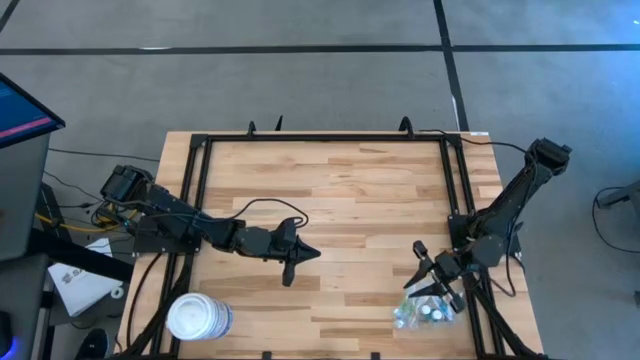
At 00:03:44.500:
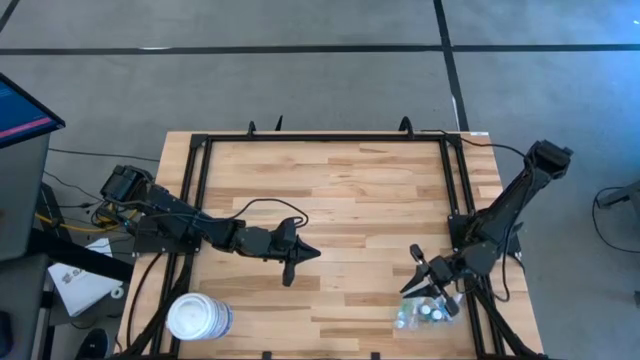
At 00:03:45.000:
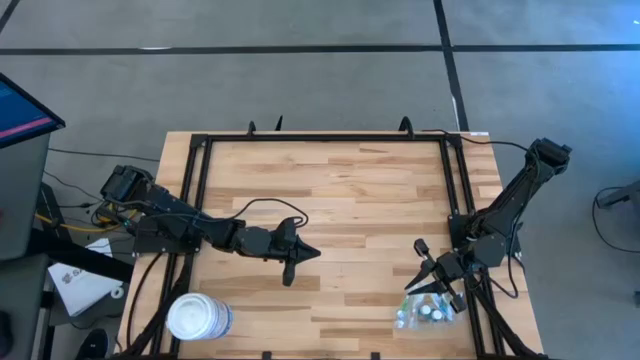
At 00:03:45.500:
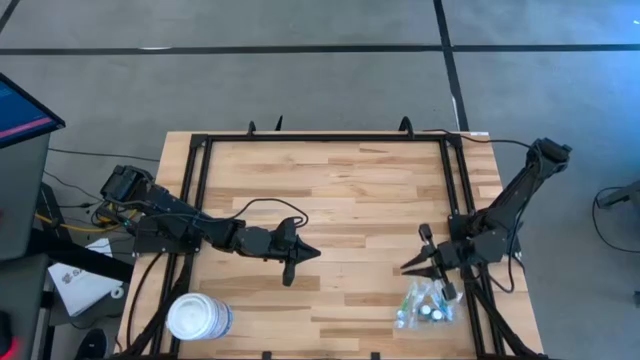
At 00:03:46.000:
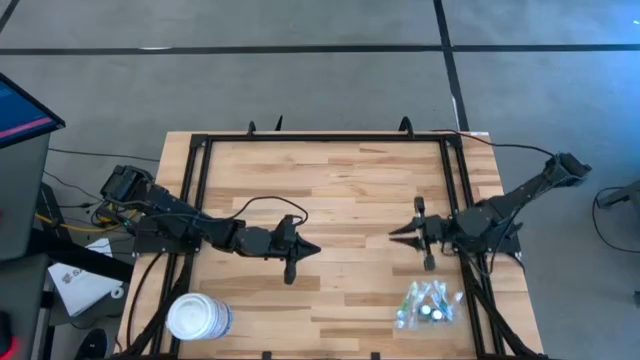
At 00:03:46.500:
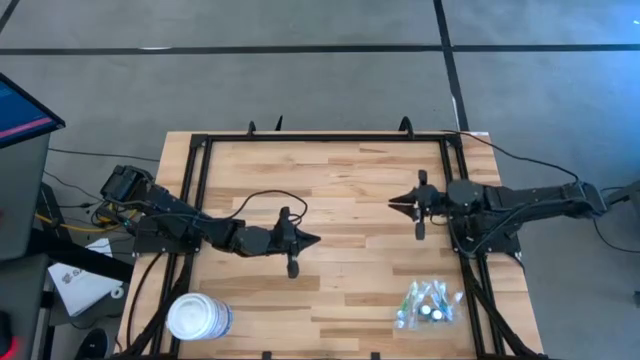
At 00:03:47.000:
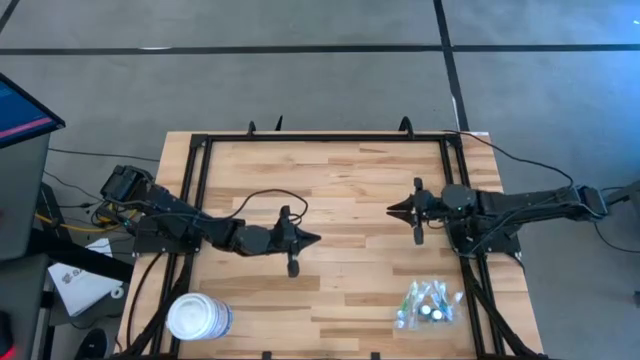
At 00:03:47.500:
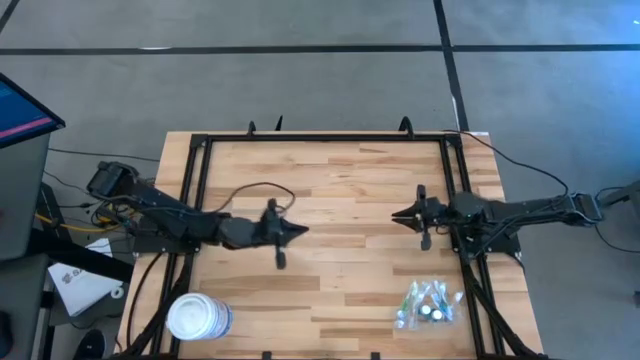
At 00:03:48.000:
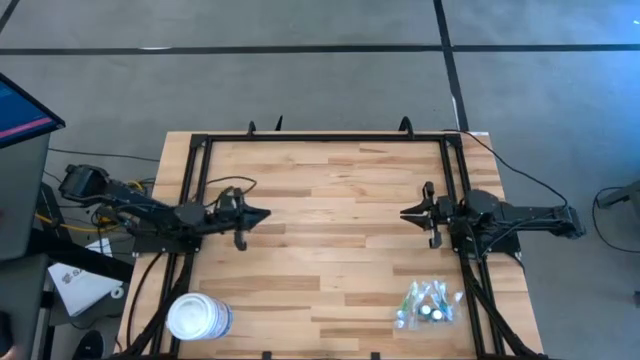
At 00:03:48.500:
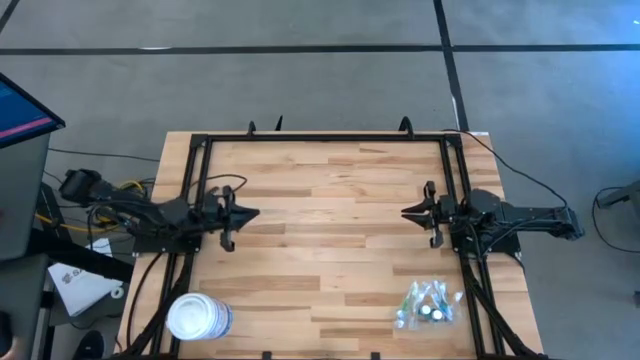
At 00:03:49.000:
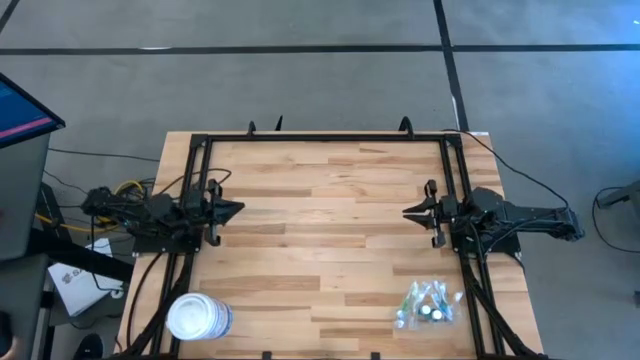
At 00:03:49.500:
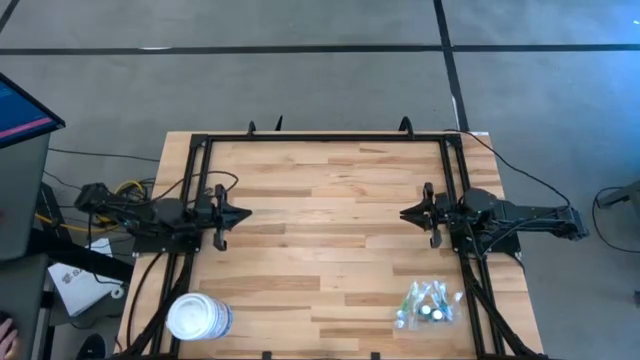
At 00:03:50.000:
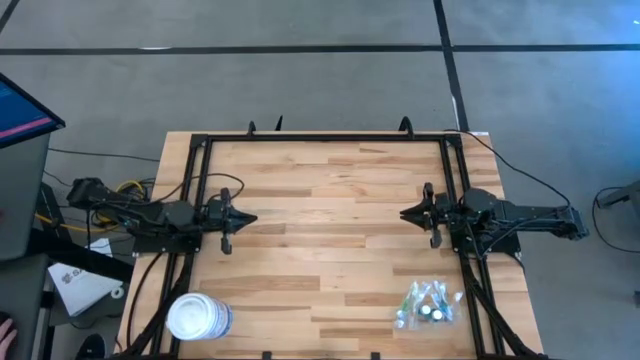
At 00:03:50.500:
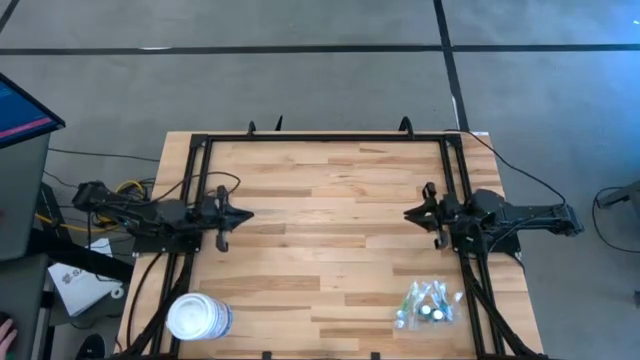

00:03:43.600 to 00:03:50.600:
Task: Pick & Place toothbrushing station
Return to Home Position

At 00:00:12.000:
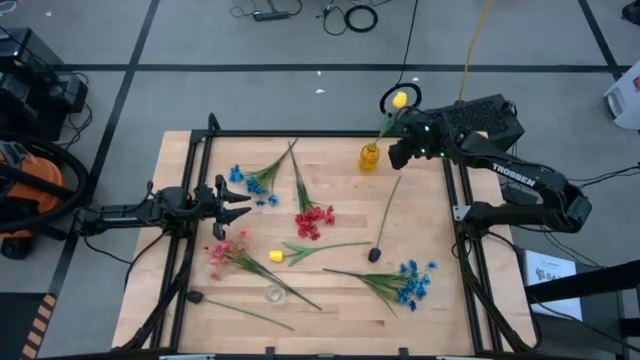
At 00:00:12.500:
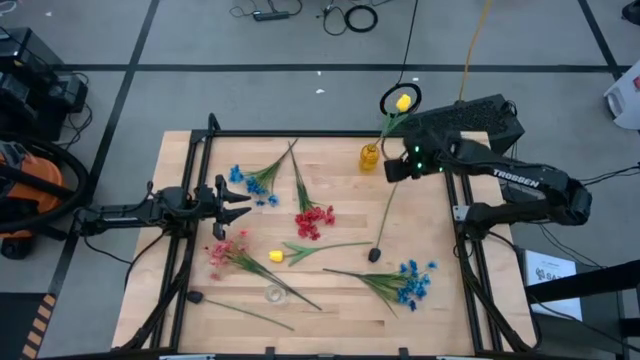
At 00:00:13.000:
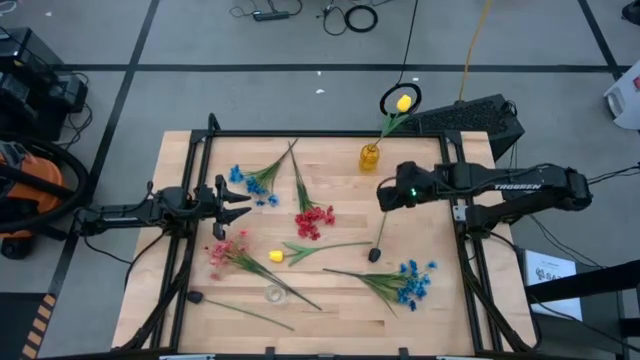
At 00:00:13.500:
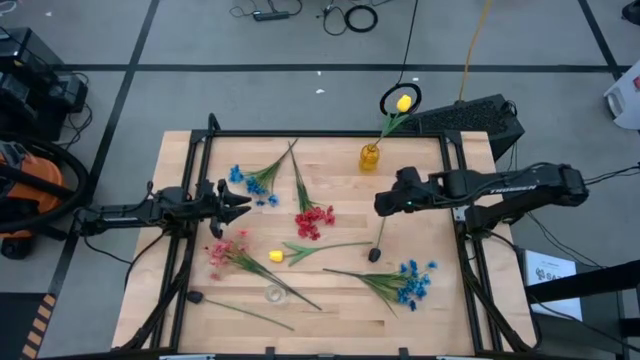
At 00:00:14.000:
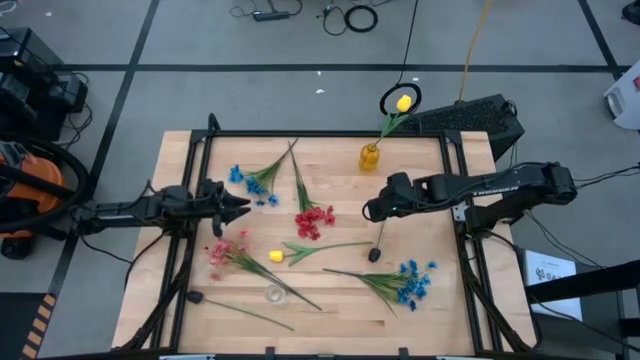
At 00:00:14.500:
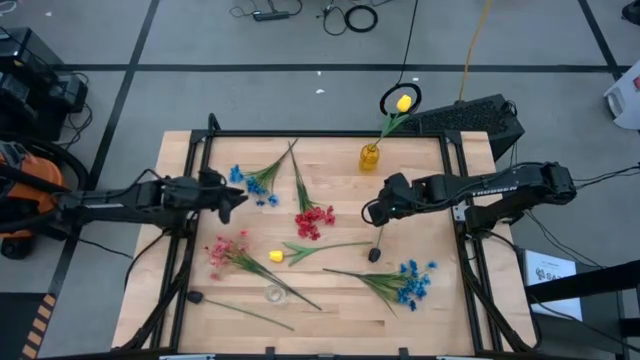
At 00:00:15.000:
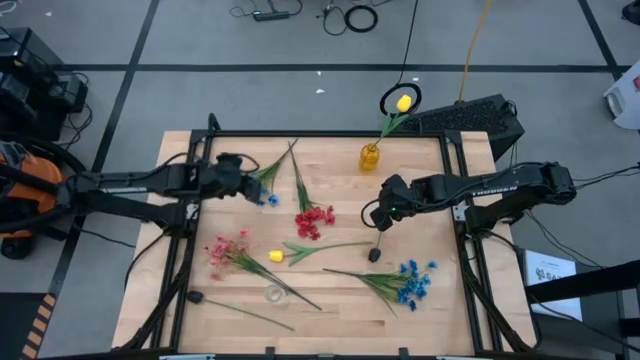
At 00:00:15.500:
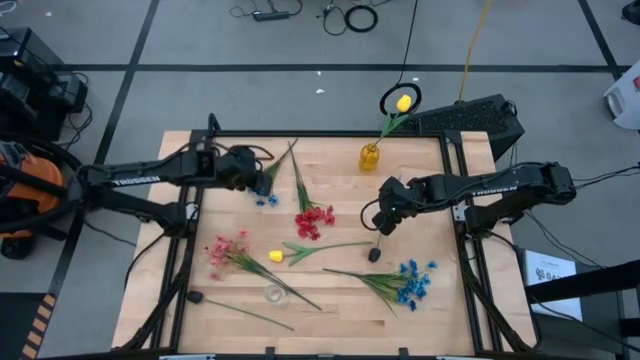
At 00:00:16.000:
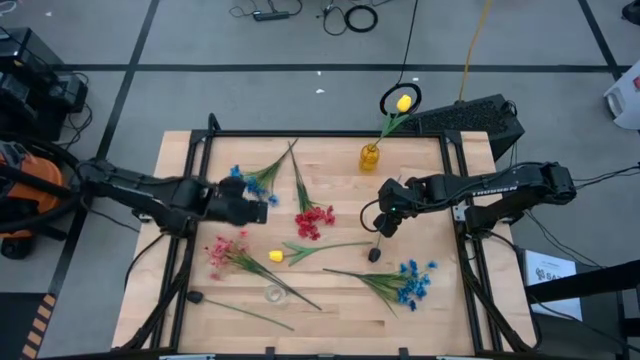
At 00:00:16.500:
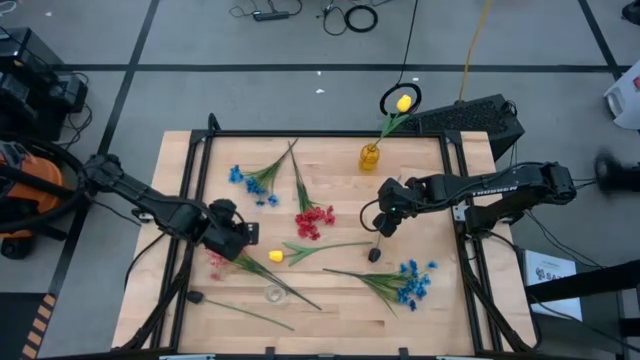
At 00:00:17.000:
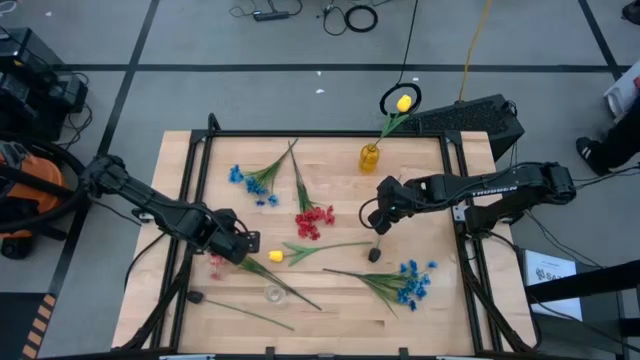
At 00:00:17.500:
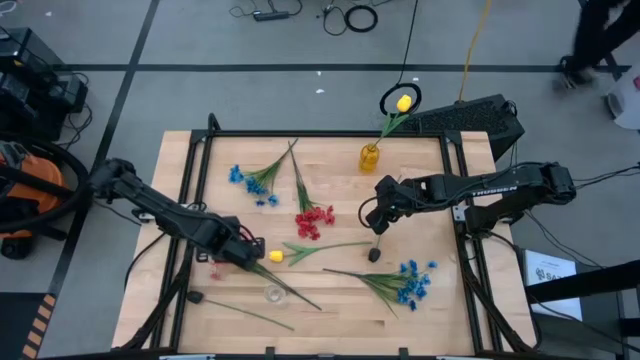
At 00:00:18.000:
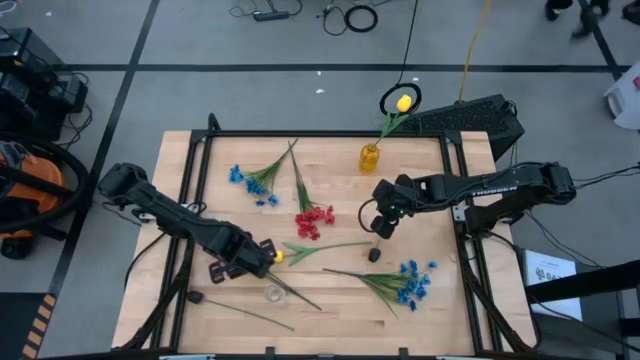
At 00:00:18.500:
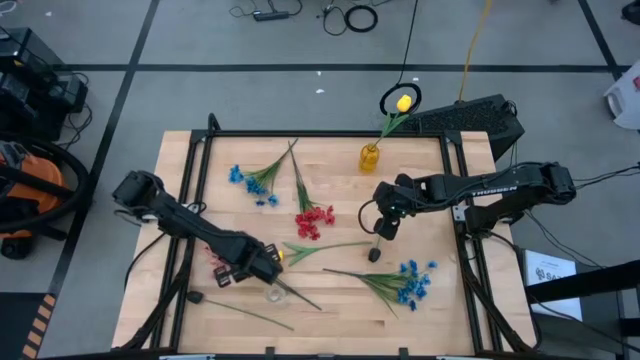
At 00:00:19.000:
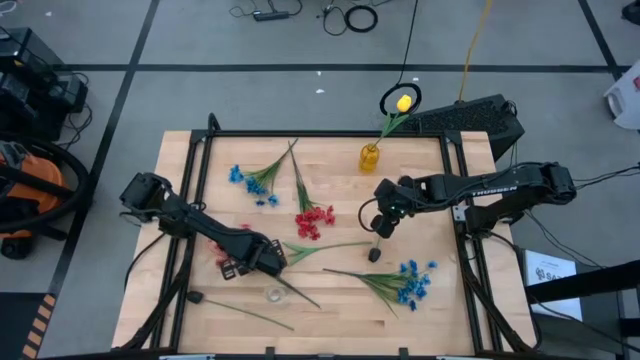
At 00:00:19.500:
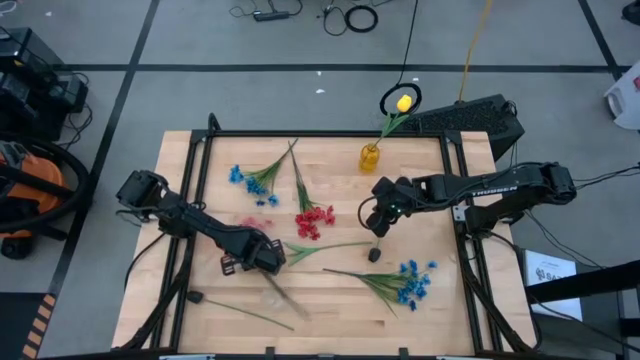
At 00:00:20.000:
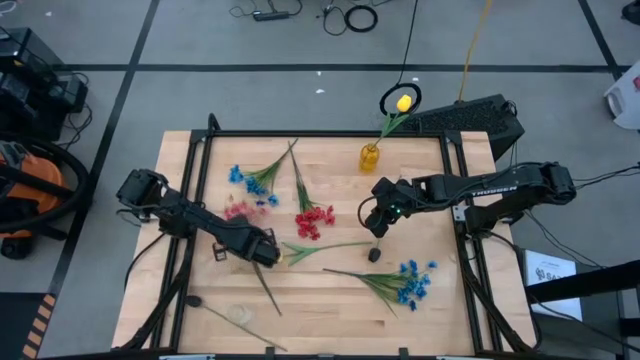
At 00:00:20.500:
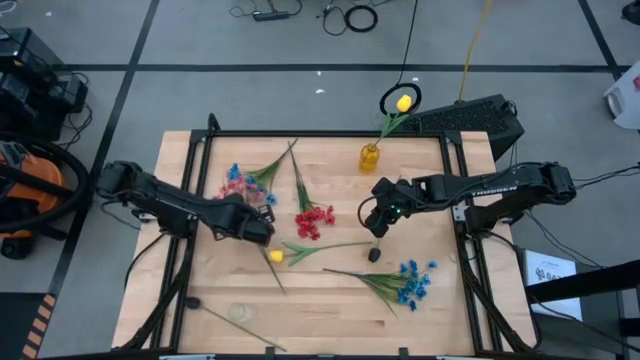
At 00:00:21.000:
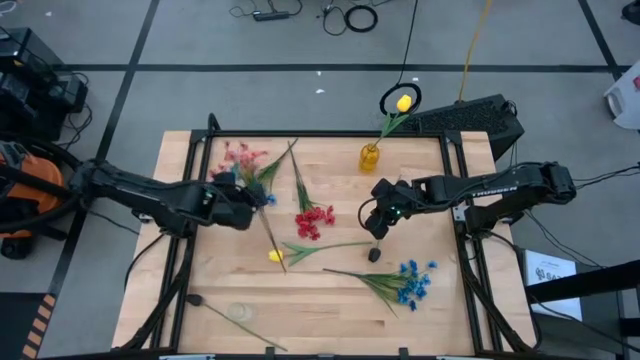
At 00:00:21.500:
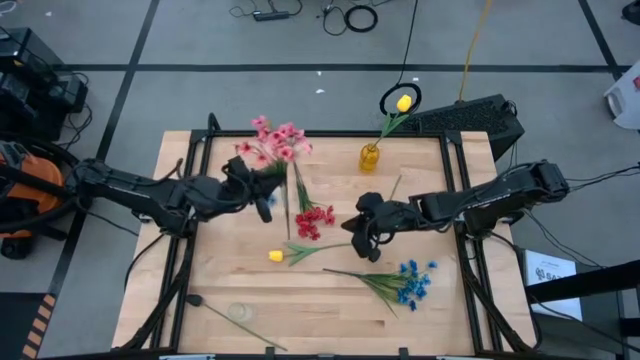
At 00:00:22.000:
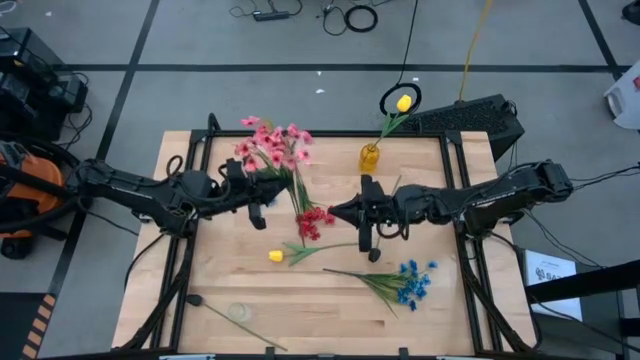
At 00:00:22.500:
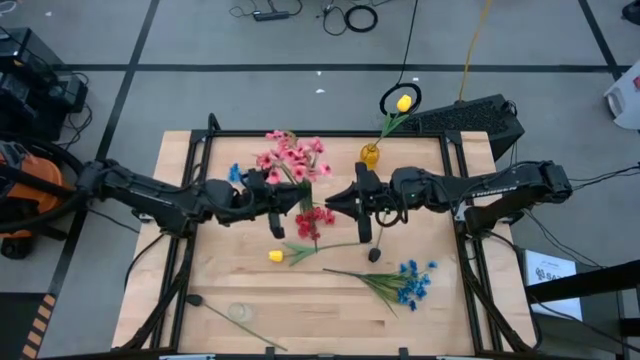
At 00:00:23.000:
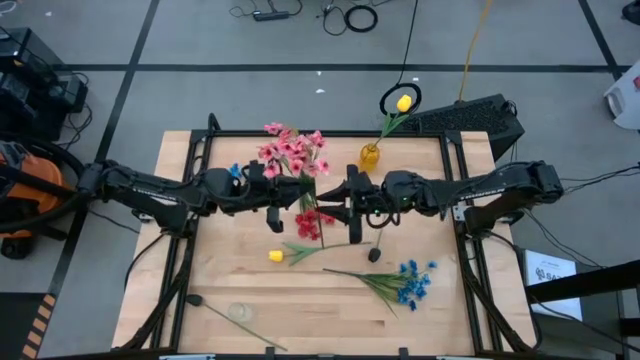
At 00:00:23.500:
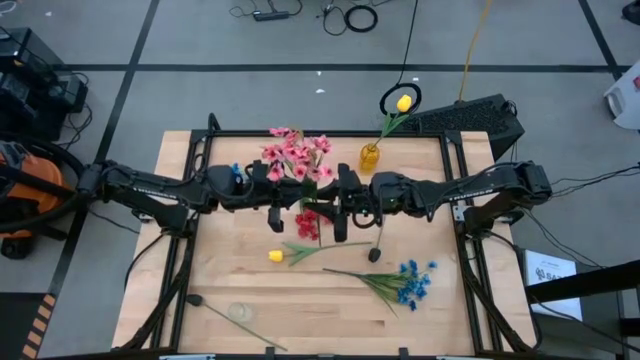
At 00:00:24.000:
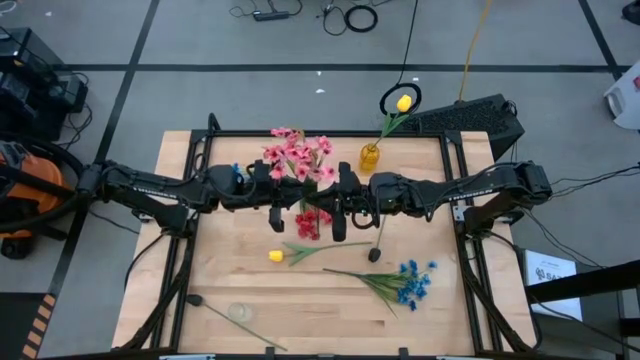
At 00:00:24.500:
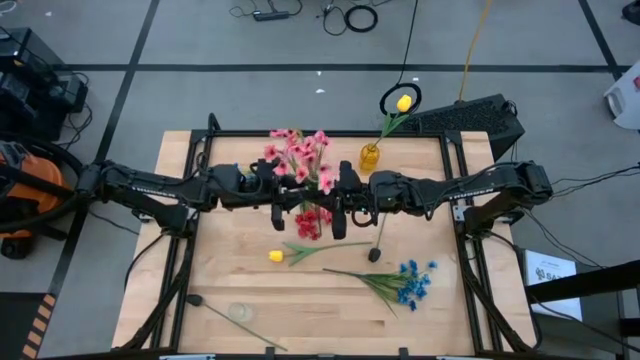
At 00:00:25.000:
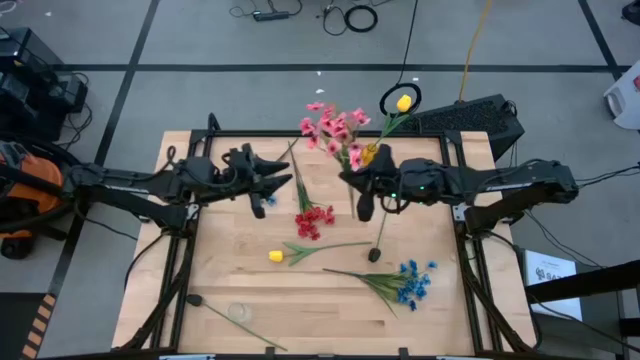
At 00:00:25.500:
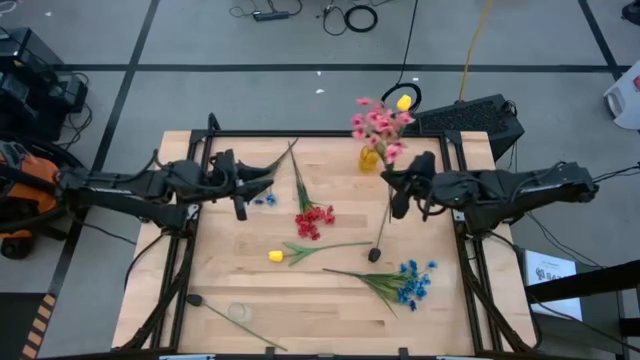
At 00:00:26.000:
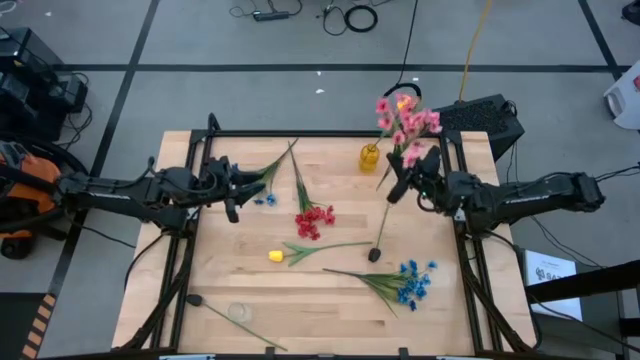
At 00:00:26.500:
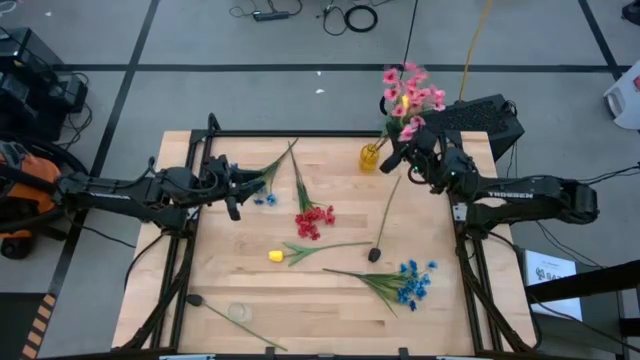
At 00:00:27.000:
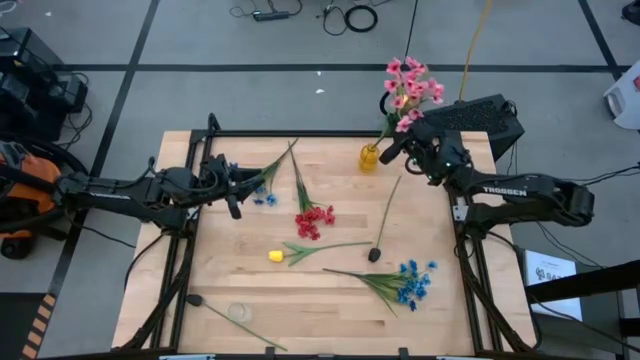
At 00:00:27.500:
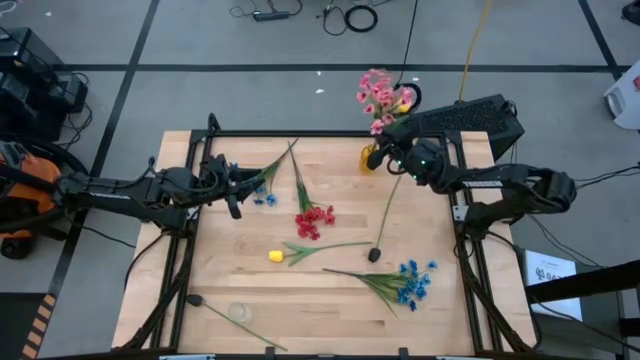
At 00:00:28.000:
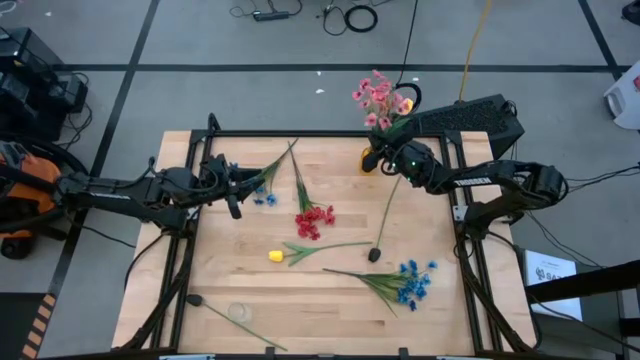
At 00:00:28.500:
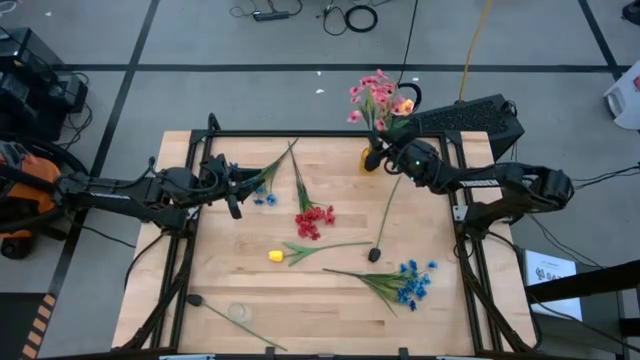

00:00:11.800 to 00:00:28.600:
Task: Sort flowers into vase by color
Put the pink flowers into the yellow vase
